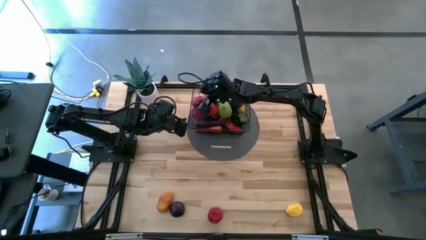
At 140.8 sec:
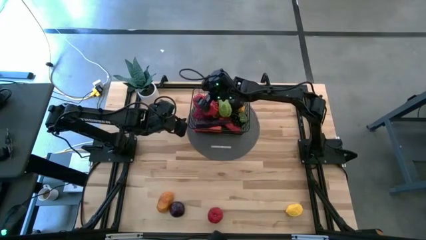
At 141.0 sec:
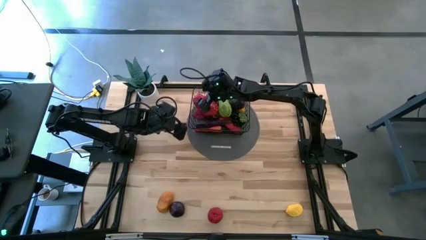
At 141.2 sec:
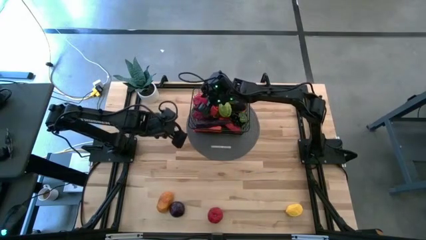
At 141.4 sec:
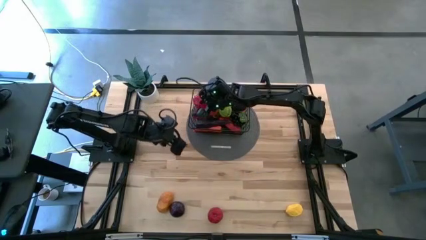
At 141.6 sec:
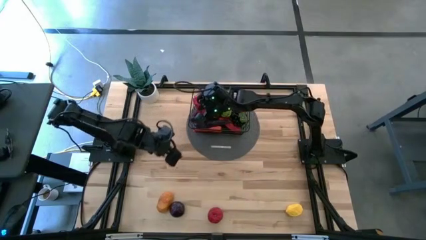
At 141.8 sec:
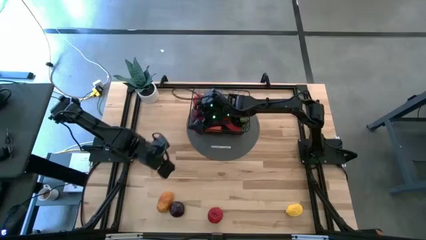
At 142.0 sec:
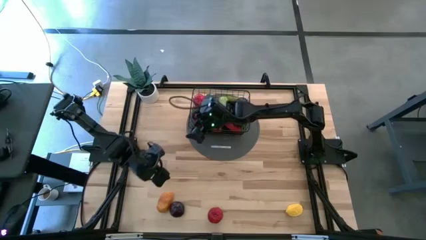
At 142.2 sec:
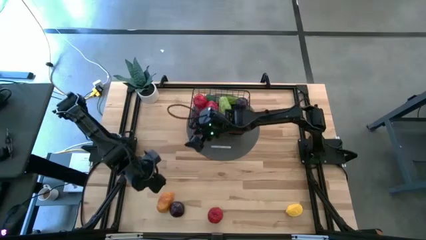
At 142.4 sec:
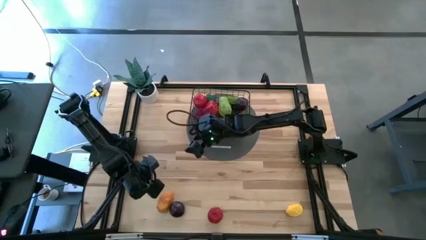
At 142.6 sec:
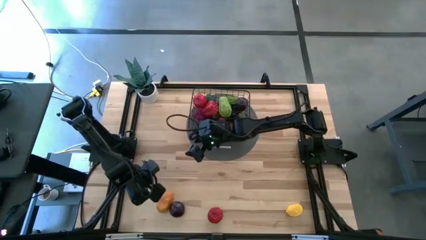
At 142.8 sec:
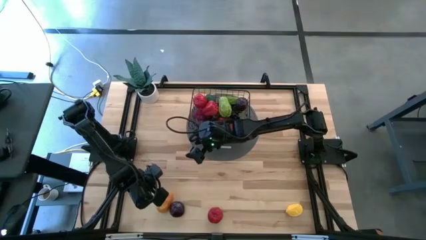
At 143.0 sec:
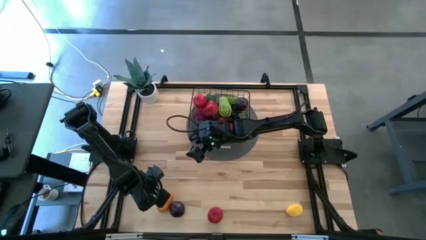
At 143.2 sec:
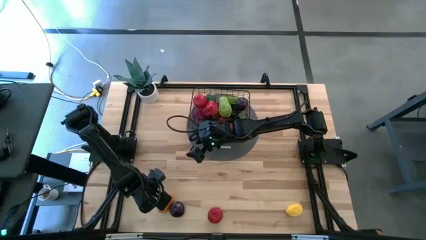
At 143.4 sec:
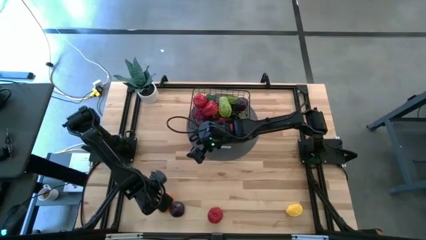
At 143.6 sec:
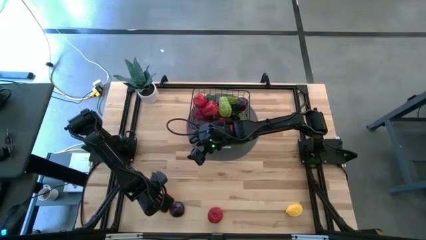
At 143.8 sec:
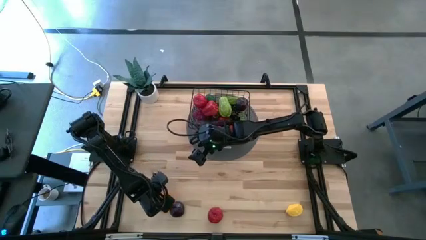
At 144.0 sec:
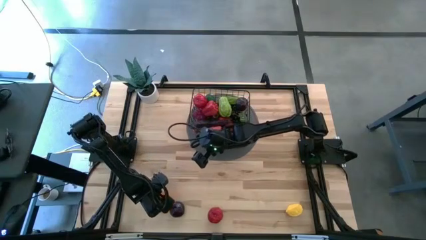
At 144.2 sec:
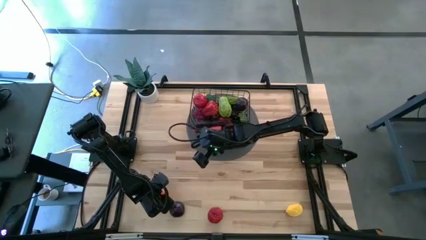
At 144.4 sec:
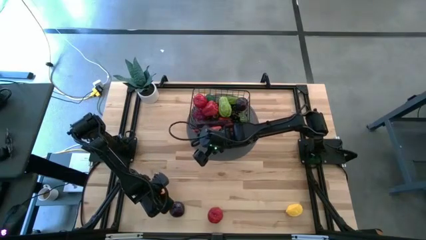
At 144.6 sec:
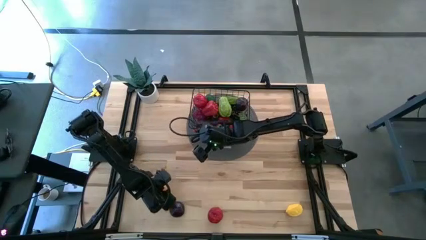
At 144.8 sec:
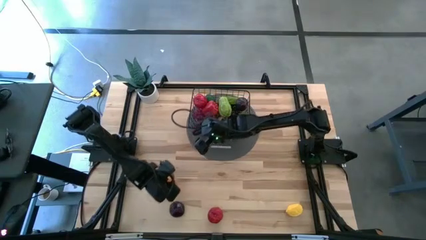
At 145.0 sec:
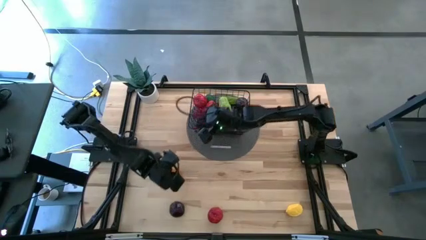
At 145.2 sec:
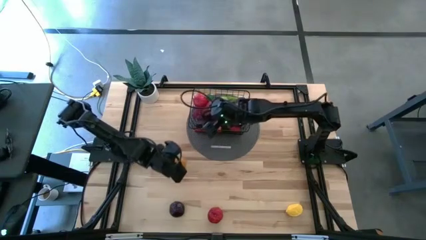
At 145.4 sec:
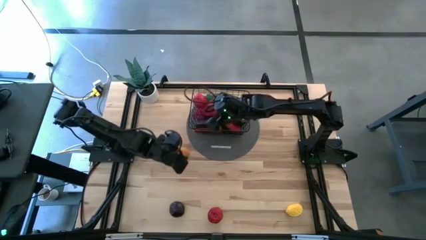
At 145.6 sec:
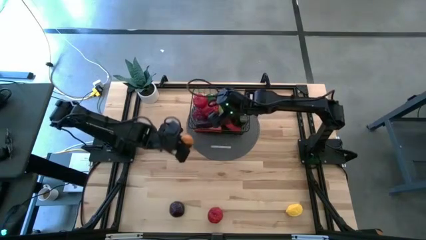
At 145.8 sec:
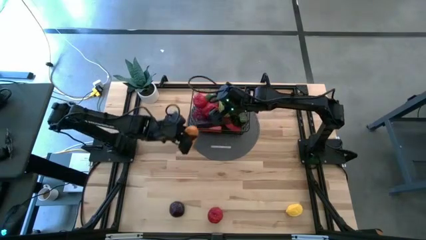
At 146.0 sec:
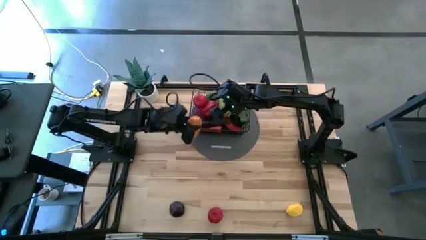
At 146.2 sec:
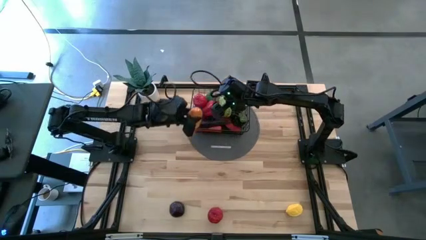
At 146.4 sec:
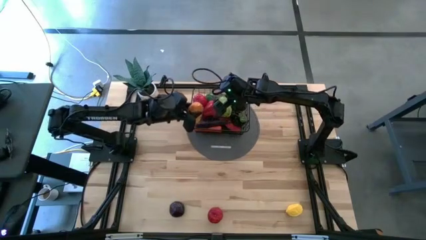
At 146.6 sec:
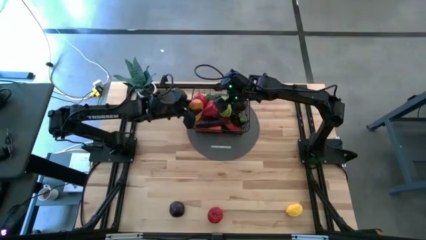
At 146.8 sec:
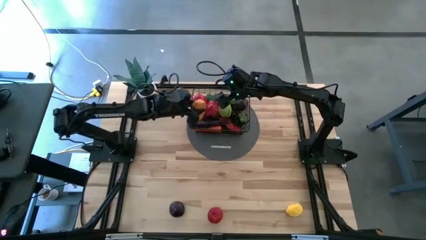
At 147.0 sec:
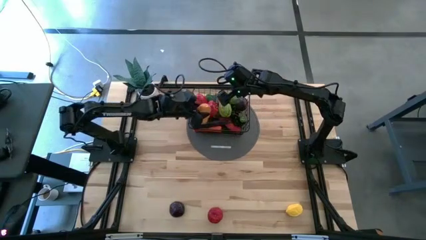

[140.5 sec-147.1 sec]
Task: Build produce basket
Put the brown potato into the wire basket

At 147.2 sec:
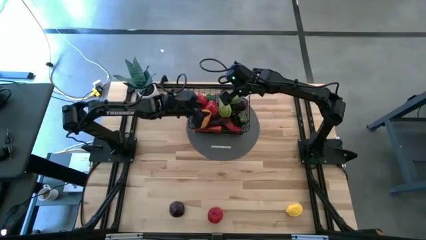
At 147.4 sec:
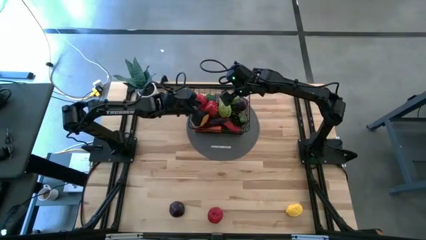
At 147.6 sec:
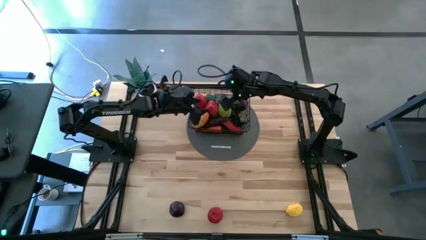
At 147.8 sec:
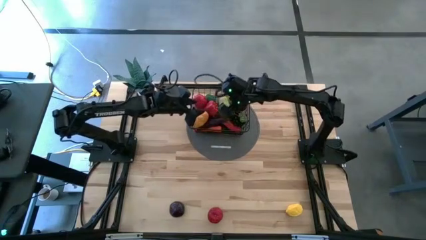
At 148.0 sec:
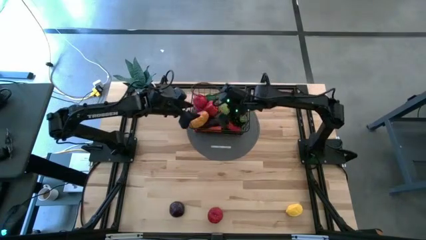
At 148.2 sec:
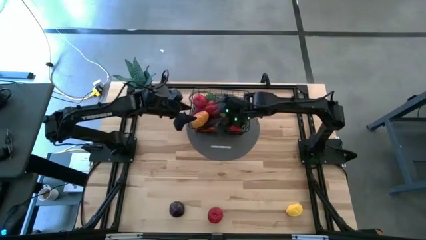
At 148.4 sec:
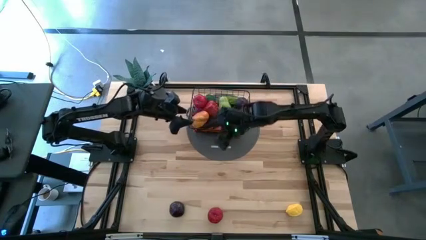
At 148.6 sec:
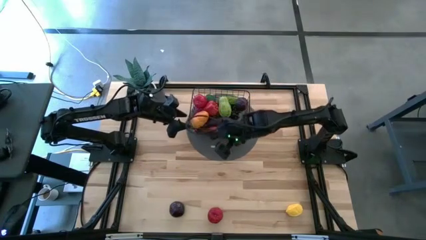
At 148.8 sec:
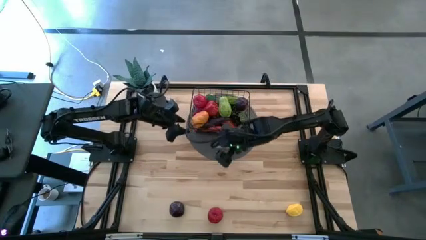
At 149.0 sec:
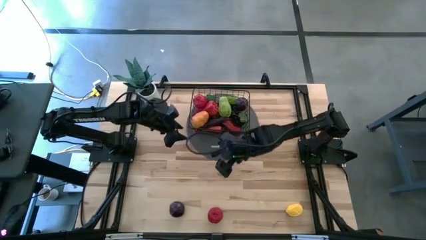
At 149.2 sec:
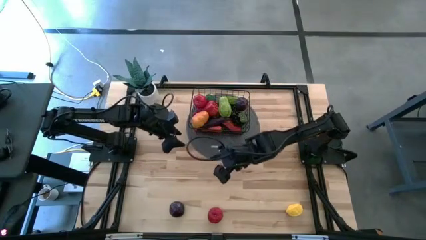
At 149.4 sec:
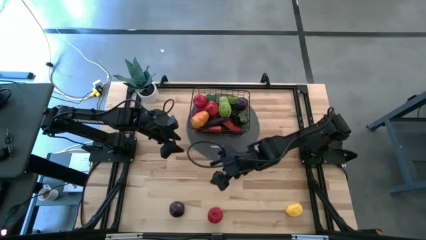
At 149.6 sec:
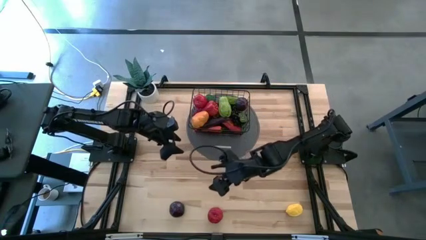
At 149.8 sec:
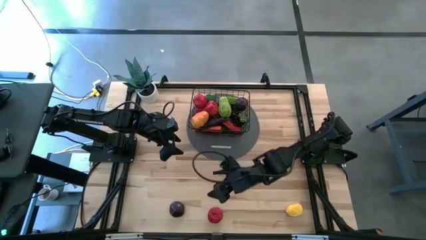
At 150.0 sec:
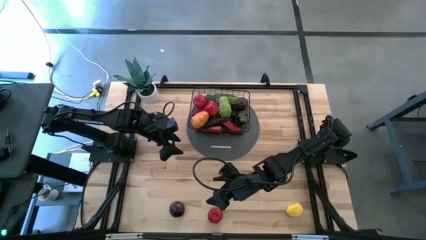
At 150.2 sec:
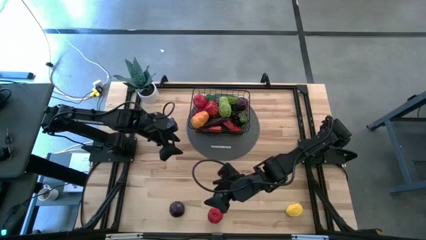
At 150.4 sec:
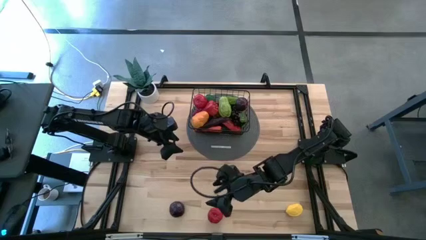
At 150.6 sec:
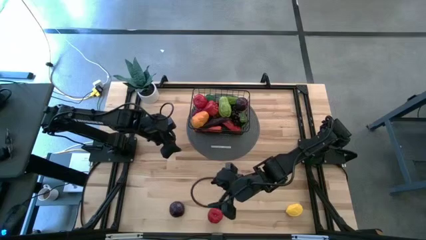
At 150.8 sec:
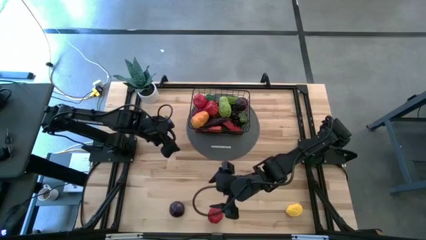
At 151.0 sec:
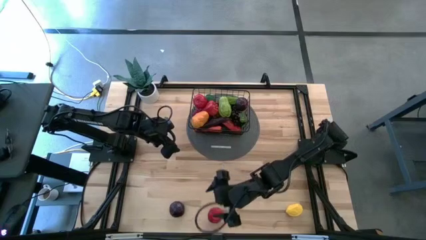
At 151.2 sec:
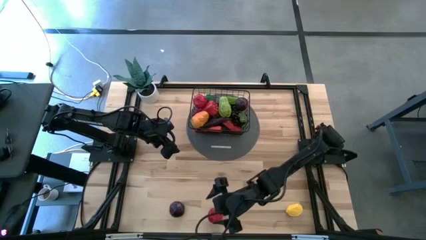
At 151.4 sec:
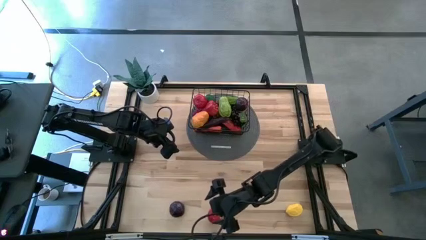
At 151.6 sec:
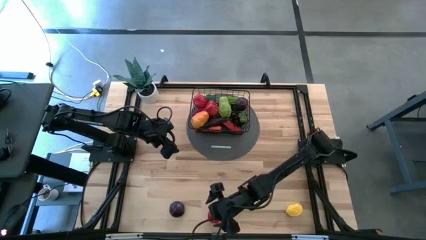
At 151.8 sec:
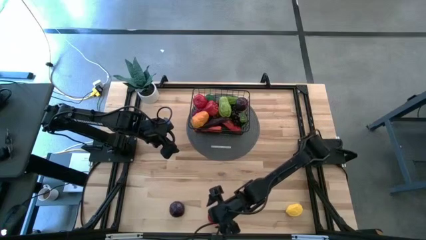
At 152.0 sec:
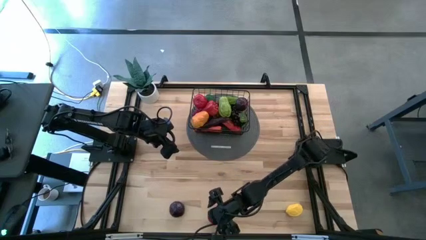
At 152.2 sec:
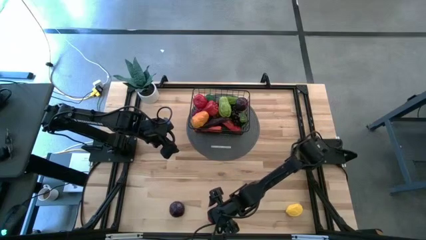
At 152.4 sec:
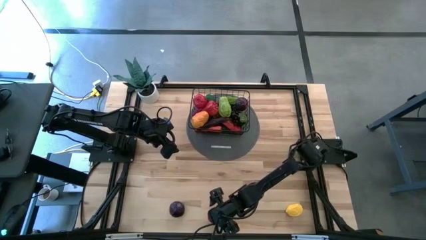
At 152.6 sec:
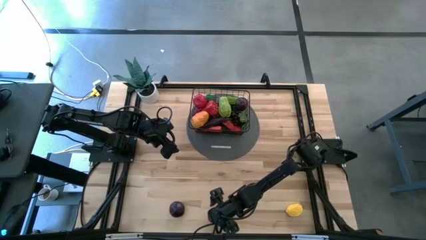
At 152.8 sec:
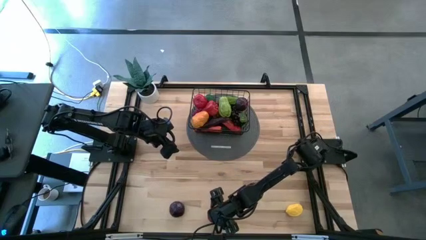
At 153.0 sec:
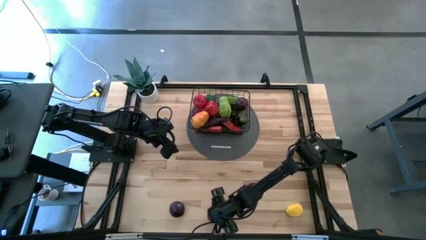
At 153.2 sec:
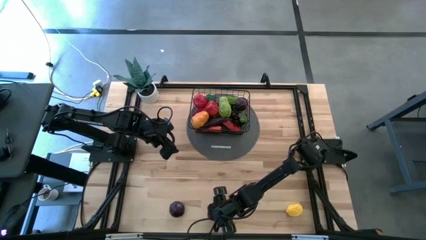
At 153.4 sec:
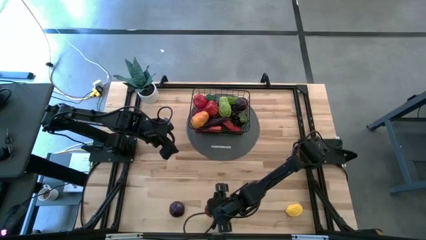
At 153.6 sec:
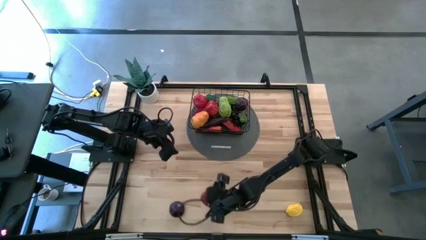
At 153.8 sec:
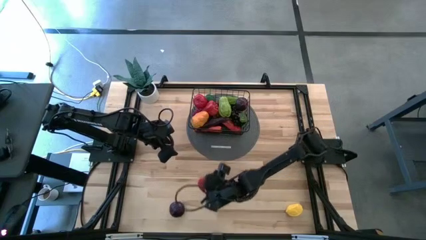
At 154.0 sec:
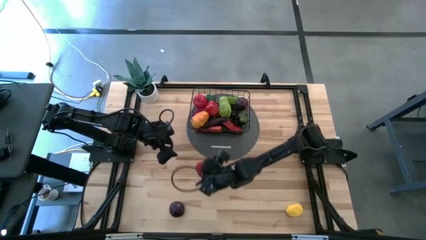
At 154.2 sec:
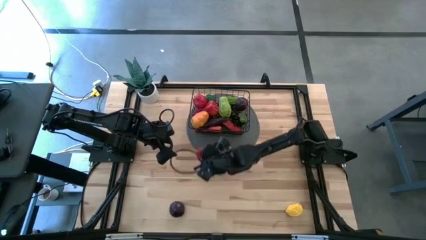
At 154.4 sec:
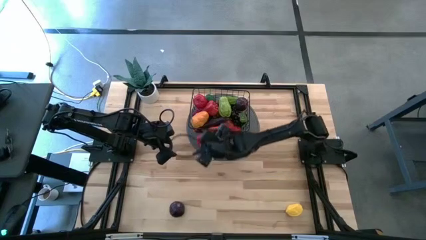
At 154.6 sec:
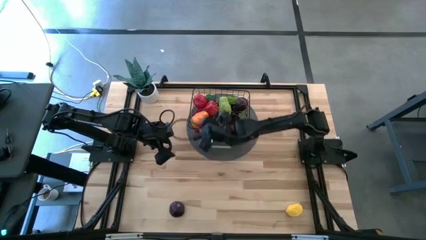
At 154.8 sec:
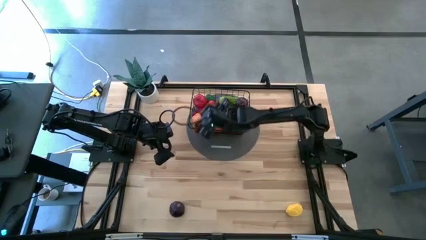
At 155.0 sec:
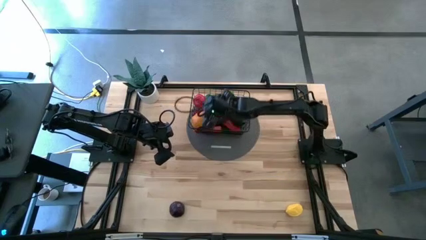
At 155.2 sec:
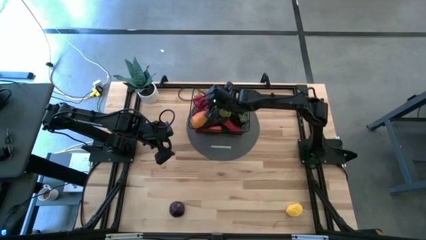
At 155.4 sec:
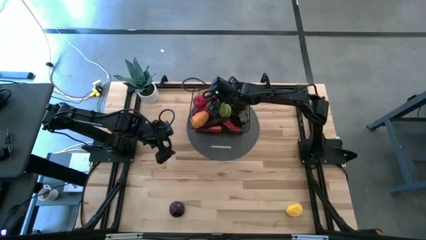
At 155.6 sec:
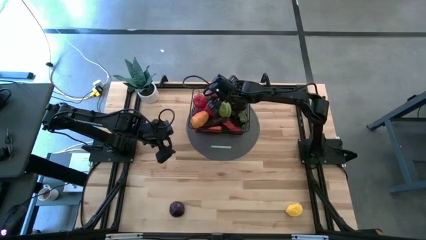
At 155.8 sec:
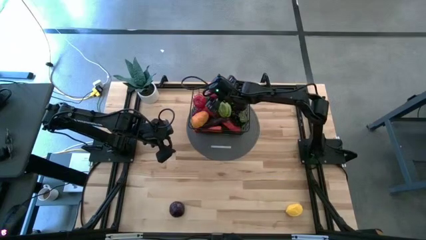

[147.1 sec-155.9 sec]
Put the red tomato into the wire basket
